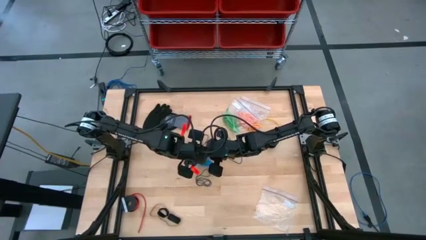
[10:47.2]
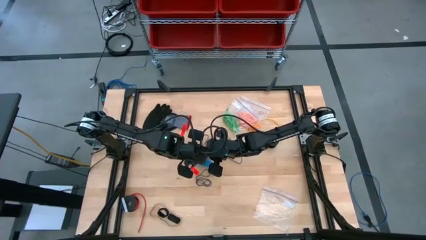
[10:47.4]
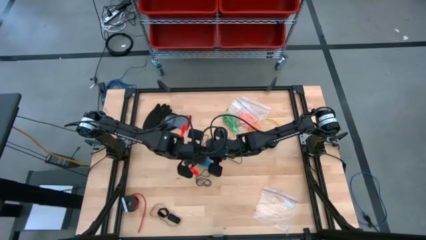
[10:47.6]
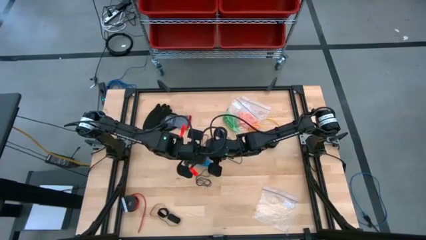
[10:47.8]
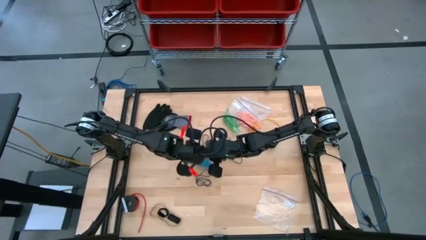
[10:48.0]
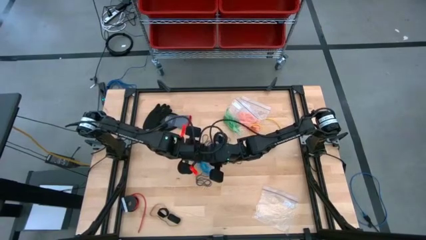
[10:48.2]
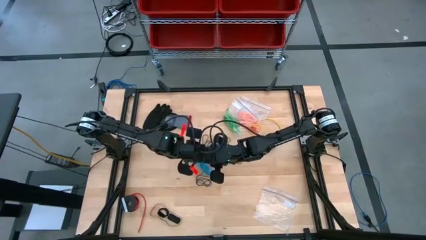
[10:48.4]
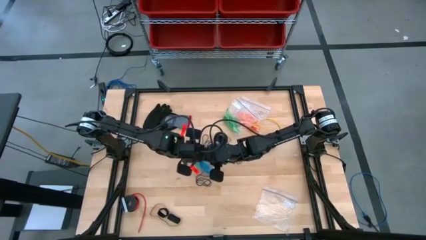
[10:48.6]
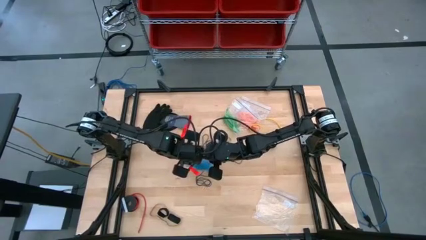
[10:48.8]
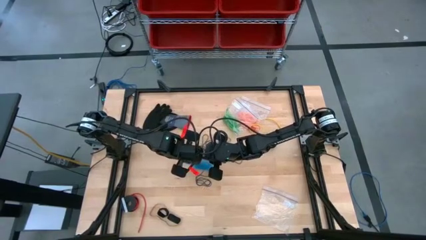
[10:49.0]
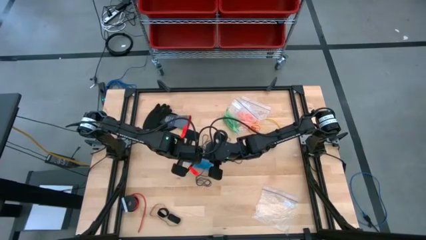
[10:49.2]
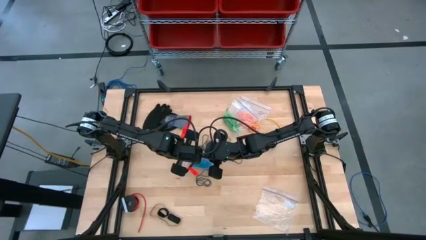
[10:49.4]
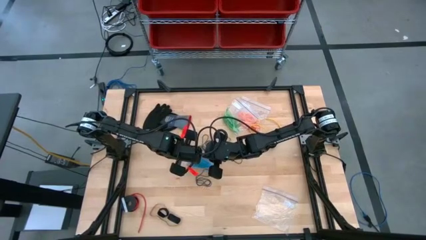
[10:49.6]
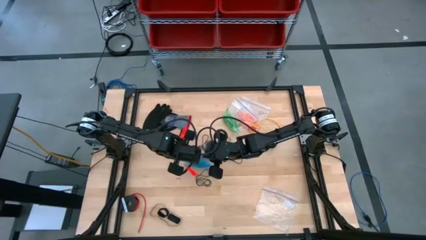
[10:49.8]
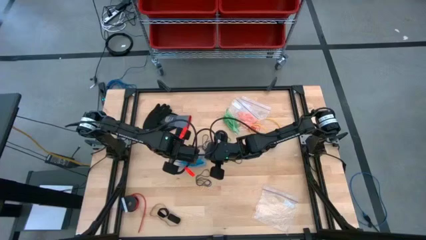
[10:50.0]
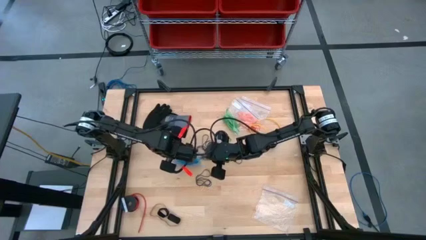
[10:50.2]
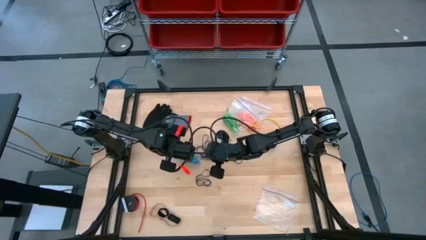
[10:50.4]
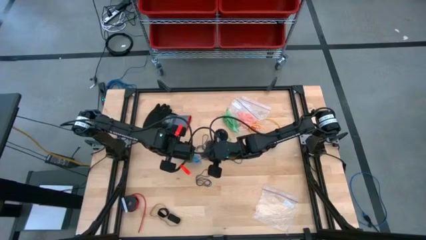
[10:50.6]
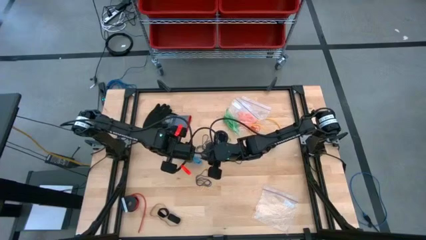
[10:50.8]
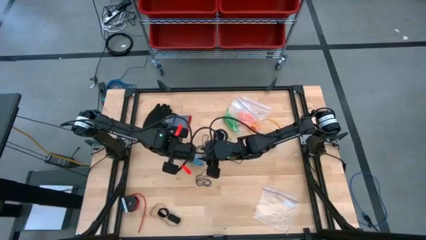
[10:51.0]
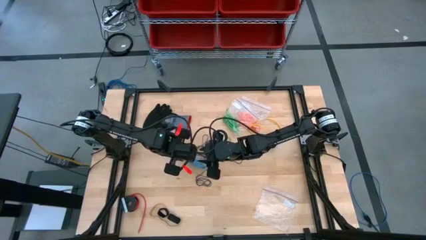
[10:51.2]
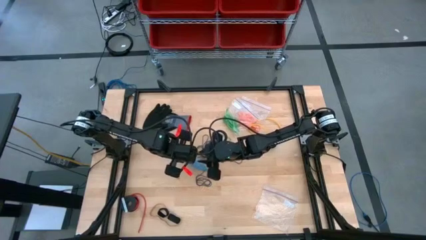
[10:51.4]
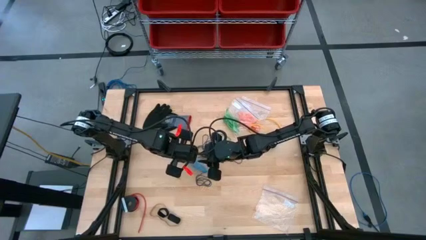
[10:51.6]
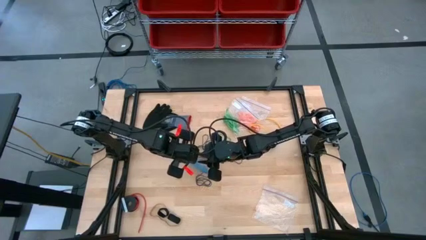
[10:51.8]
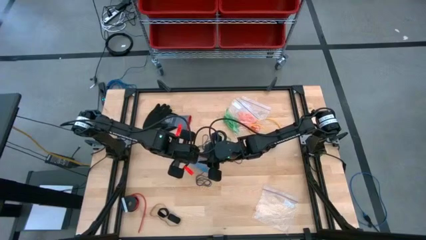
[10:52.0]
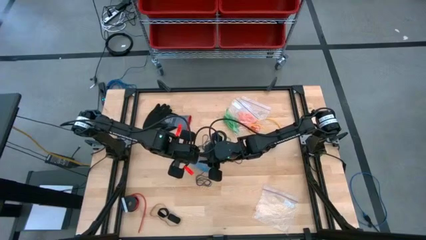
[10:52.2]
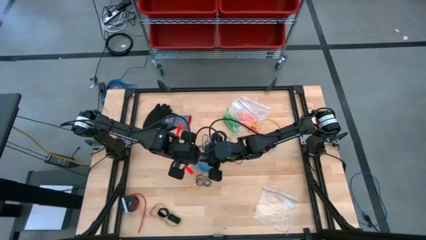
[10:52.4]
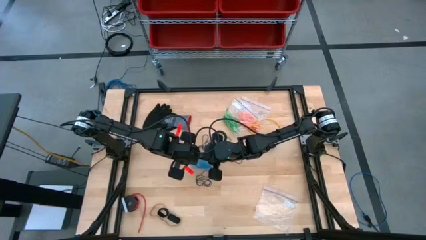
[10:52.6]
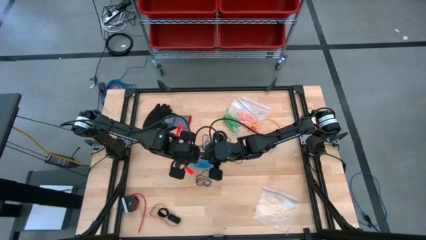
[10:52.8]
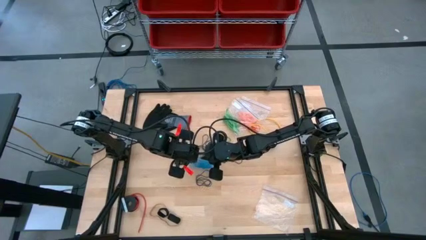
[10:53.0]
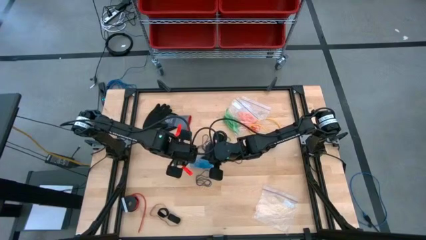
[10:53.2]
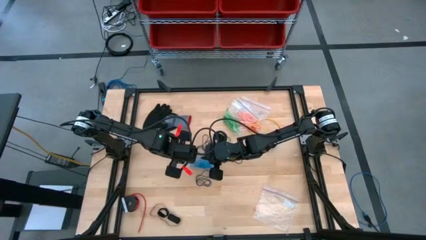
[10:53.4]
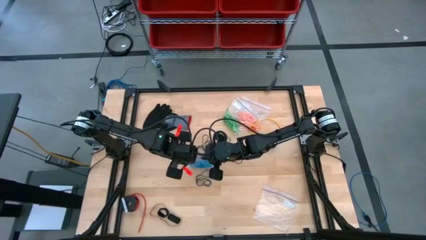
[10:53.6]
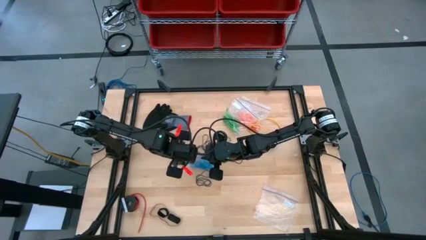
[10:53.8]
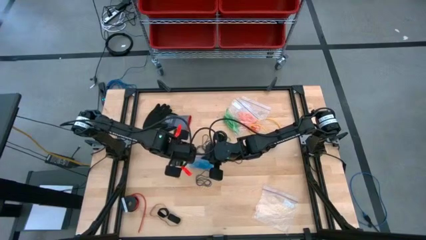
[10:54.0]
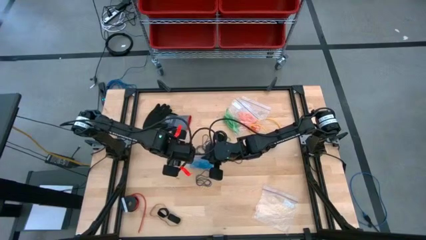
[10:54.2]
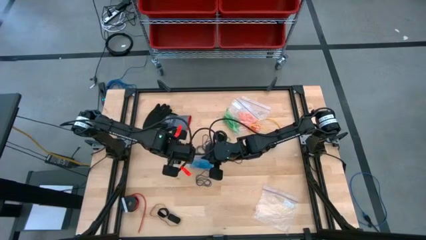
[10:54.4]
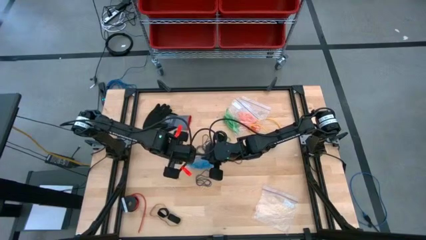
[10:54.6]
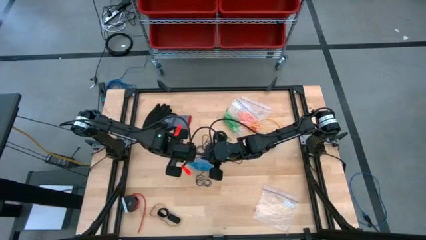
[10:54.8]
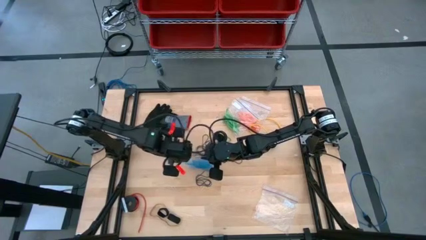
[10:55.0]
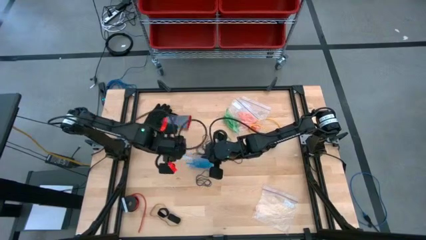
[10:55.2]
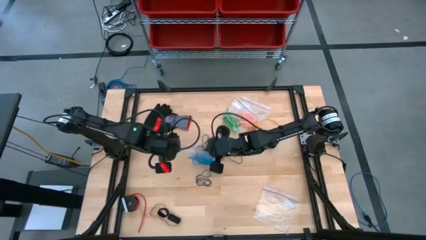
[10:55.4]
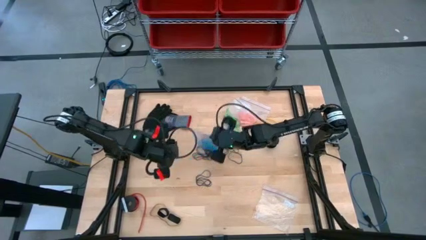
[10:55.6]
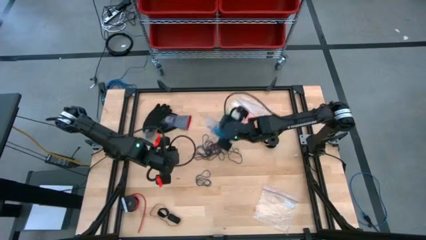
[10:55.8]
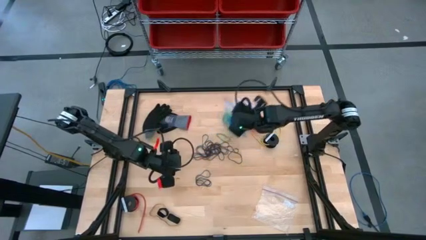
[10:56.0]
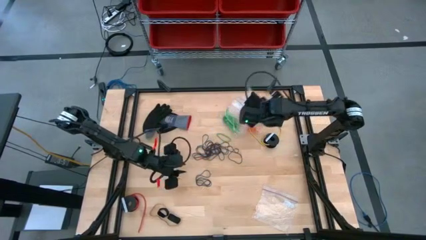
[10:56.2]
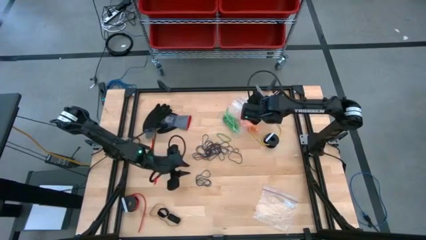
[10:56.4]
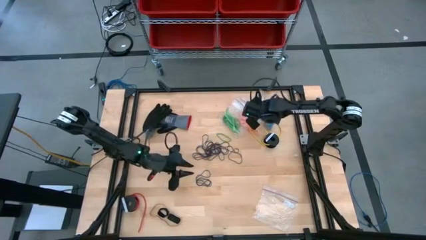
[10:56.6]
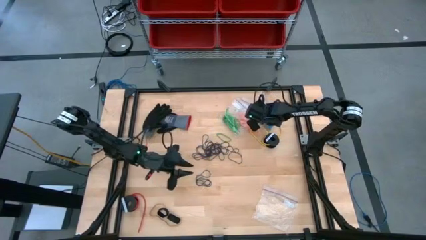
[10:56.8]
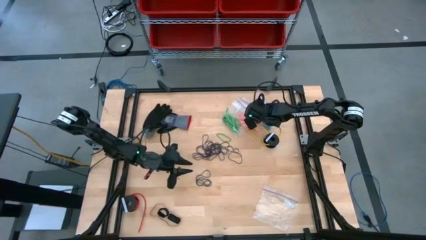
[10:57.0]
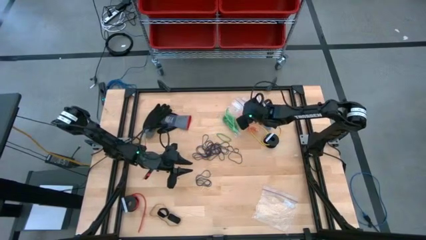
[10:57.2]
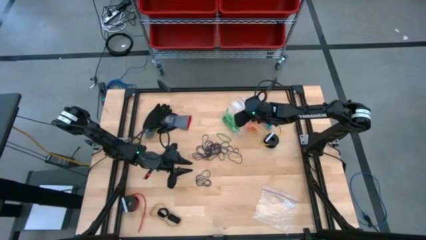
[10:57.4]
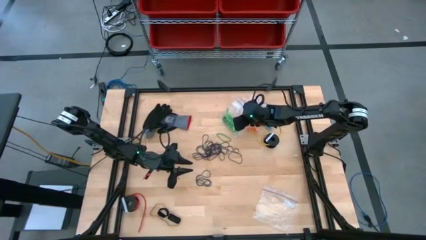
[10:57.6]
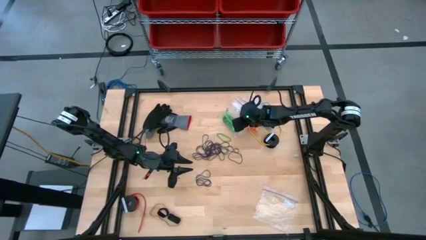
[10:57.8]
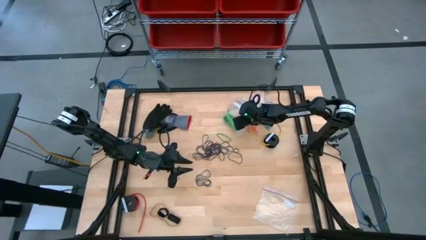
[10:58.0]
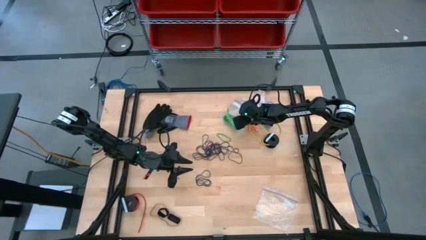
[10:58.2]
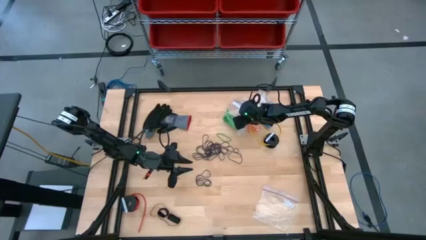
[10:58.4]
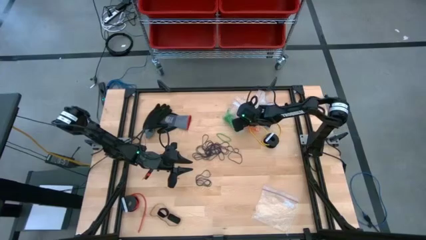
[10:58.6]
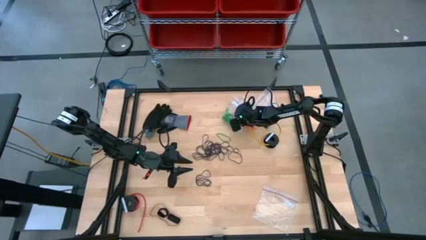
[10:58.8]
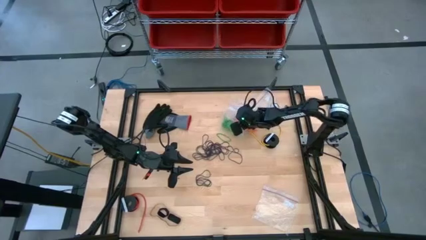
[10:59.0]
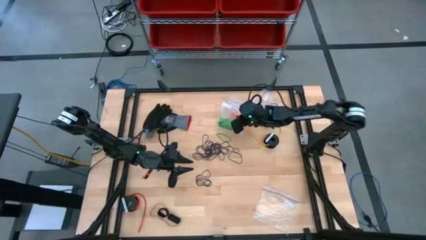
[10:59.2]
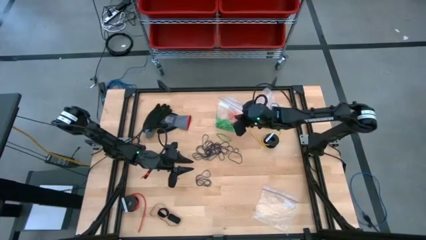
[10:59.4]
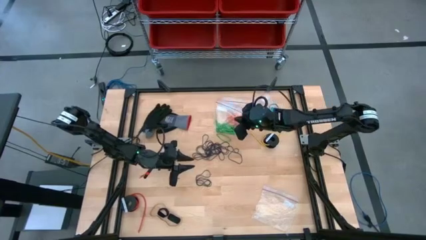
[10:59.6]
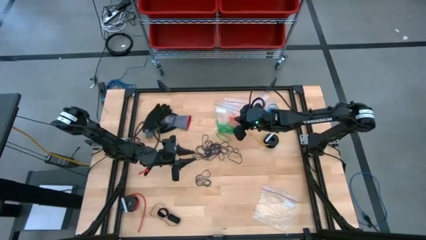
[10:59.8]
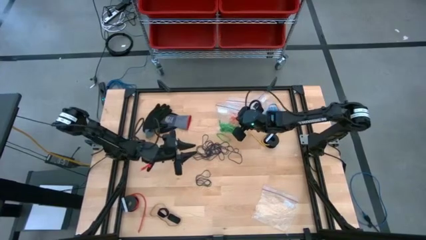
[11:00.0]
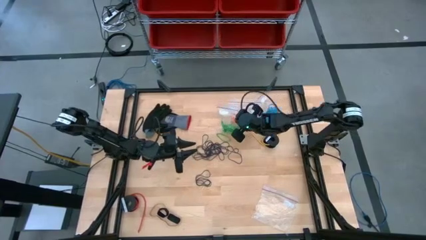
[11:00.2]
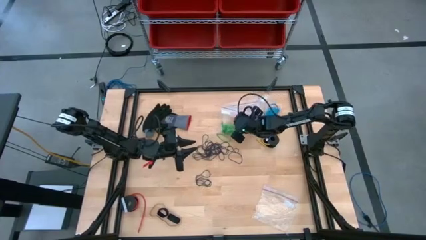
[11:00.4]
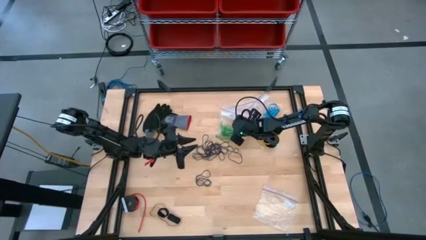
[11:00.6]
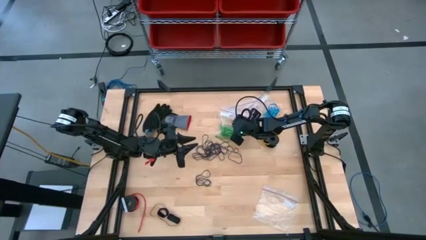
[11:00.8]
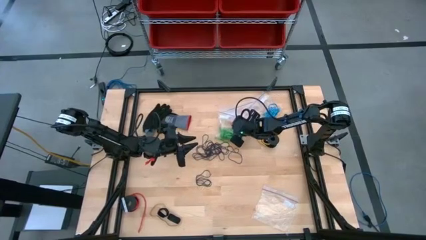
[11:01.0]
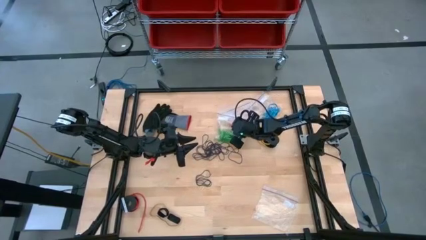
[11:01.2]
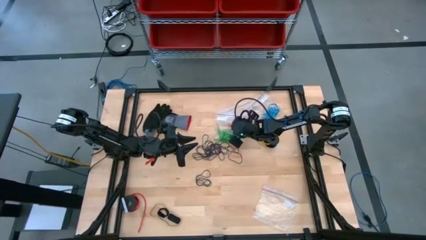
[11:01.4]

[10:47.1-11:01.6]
Task: Sort rubber bands
Close the transparent zip bag
